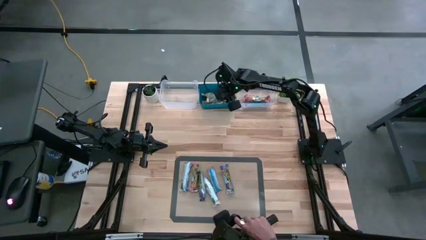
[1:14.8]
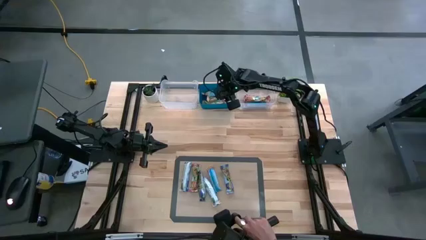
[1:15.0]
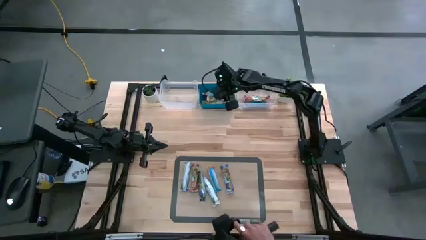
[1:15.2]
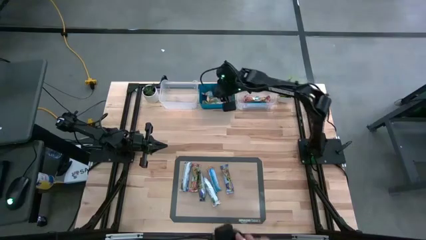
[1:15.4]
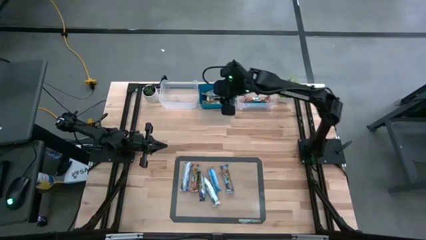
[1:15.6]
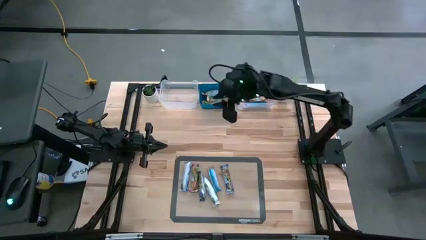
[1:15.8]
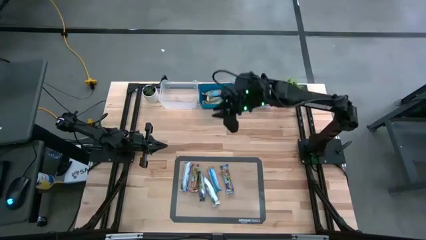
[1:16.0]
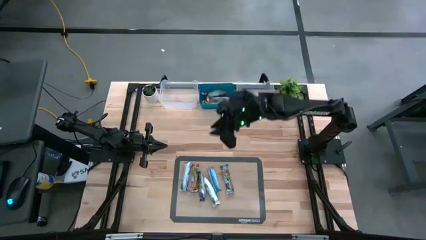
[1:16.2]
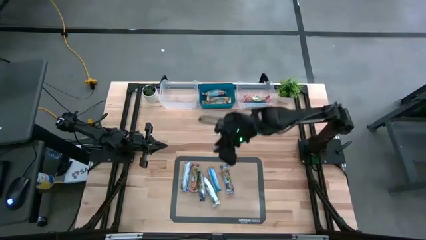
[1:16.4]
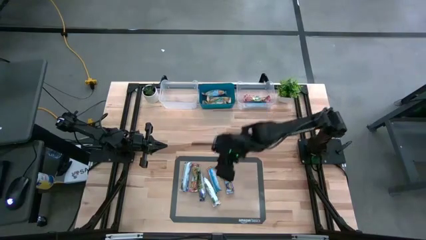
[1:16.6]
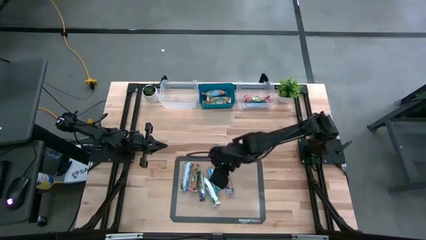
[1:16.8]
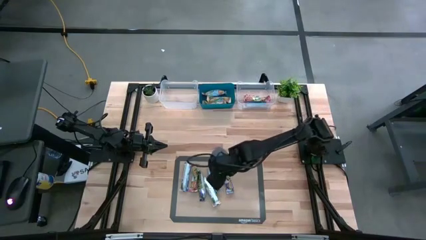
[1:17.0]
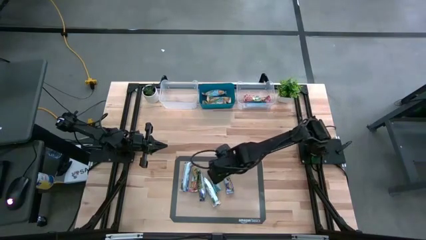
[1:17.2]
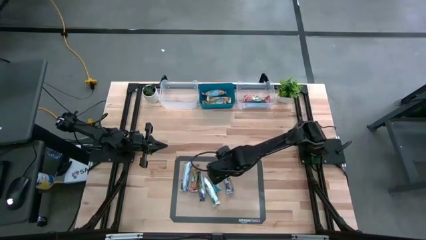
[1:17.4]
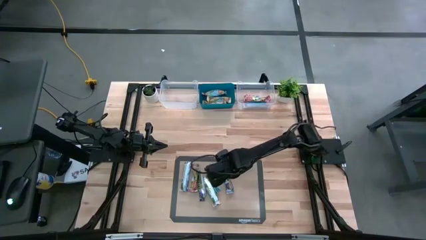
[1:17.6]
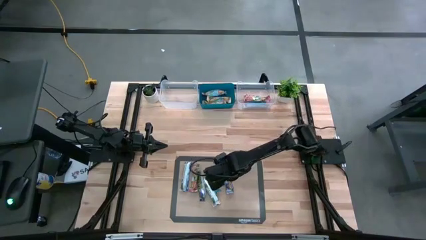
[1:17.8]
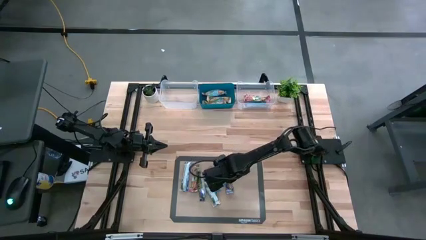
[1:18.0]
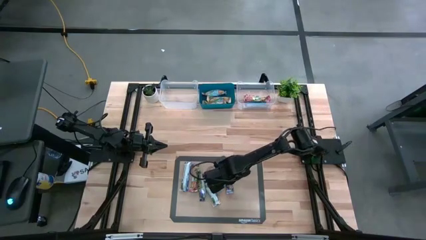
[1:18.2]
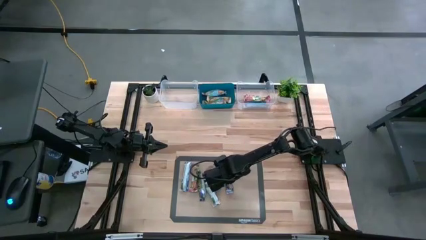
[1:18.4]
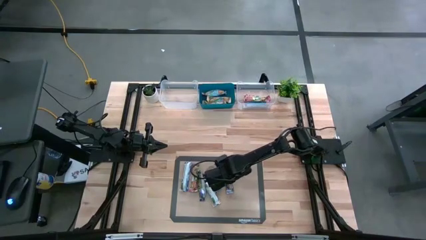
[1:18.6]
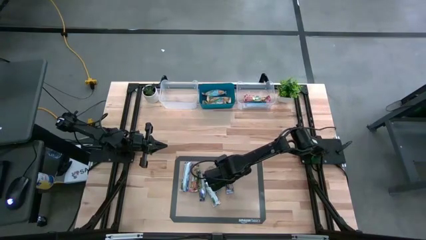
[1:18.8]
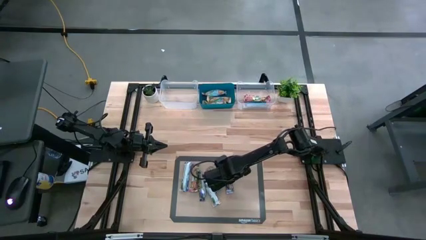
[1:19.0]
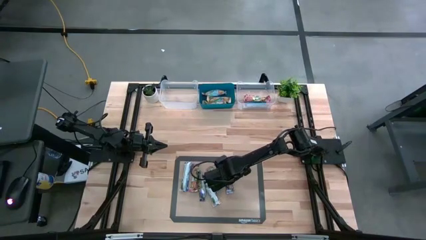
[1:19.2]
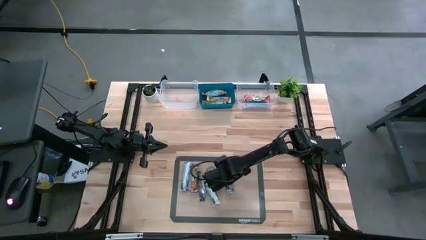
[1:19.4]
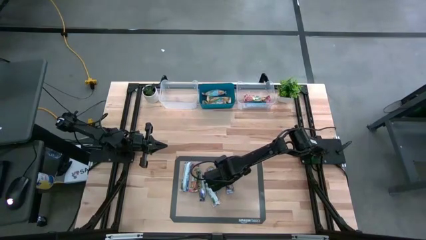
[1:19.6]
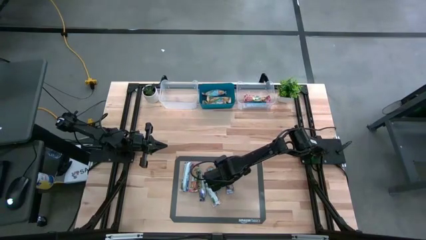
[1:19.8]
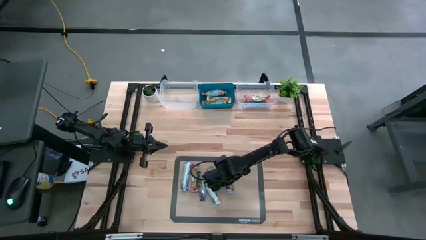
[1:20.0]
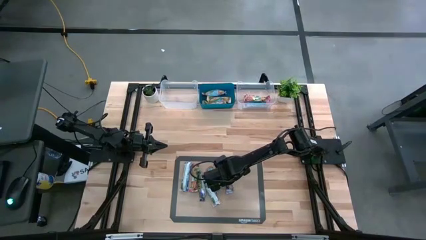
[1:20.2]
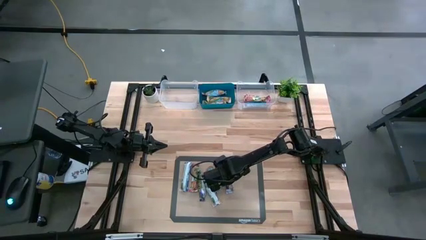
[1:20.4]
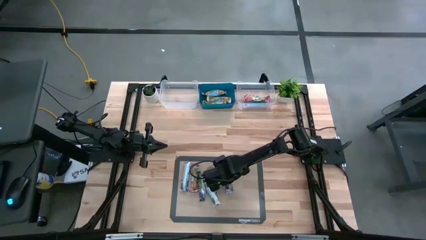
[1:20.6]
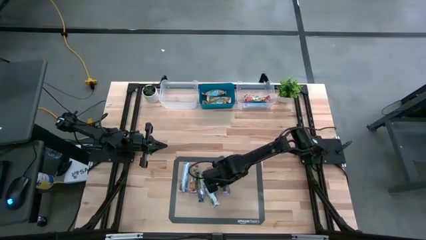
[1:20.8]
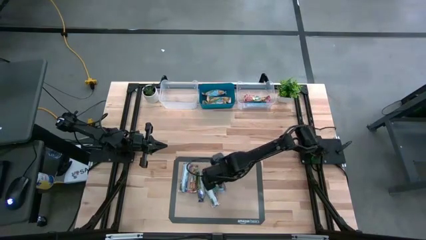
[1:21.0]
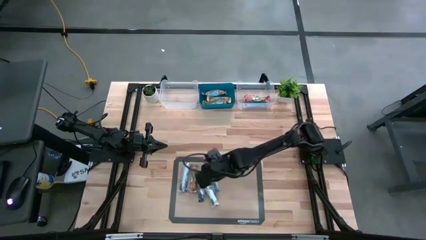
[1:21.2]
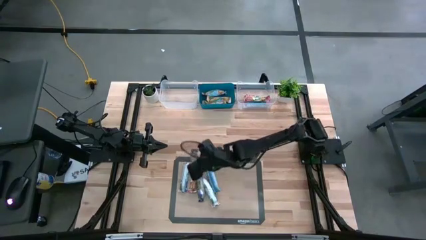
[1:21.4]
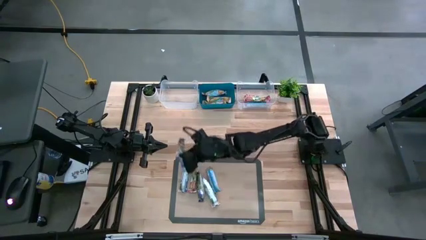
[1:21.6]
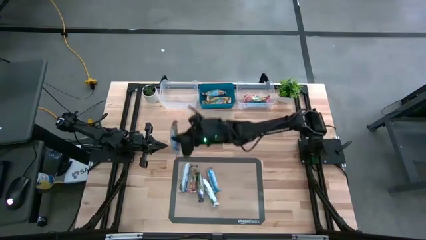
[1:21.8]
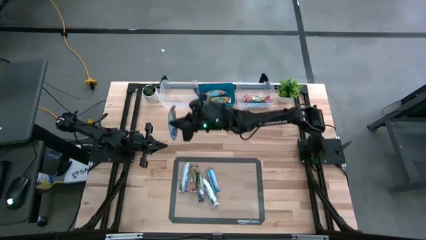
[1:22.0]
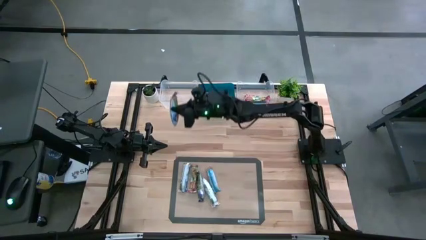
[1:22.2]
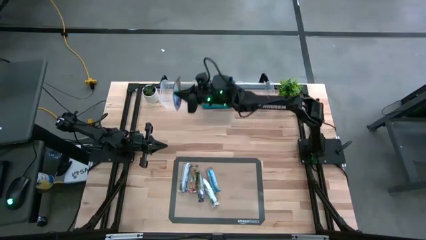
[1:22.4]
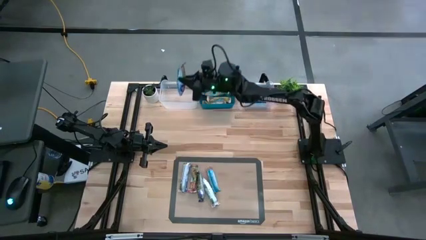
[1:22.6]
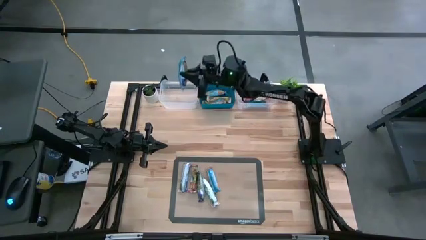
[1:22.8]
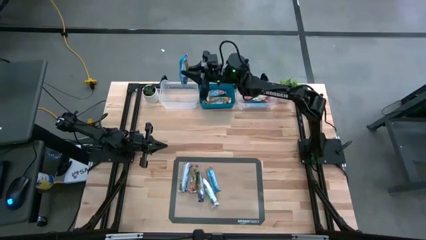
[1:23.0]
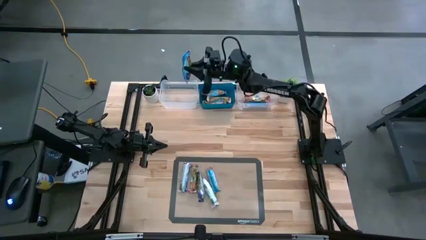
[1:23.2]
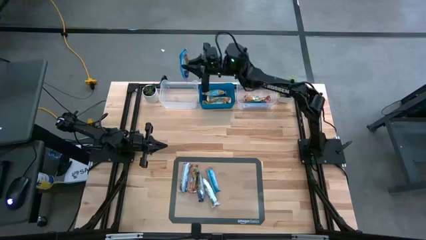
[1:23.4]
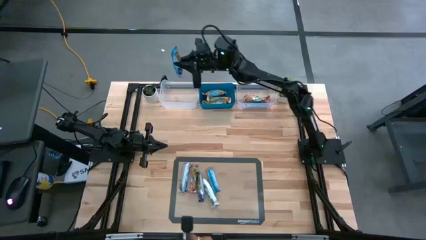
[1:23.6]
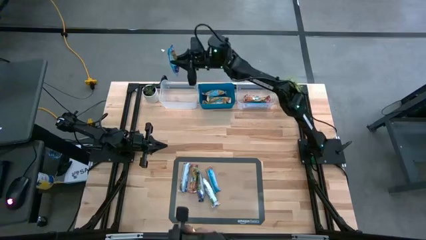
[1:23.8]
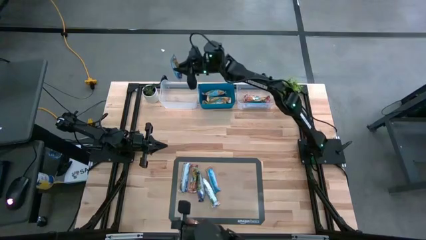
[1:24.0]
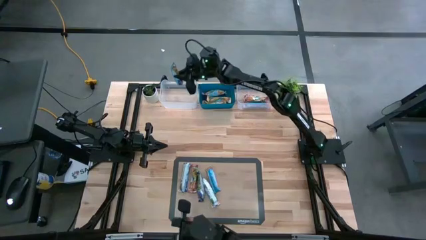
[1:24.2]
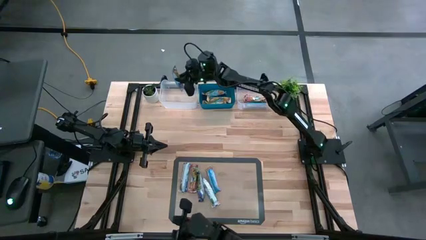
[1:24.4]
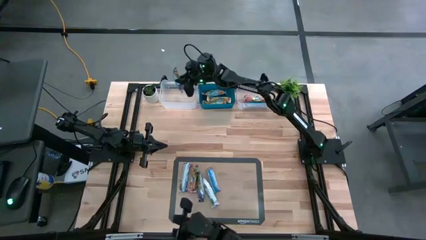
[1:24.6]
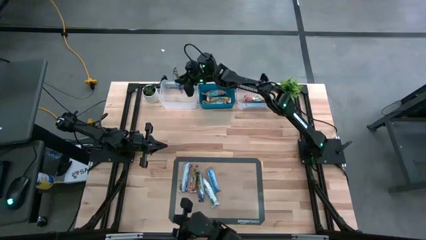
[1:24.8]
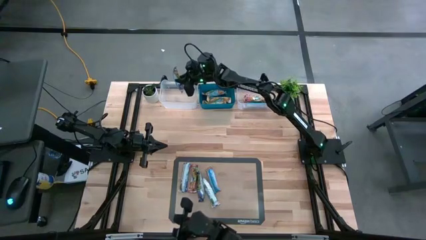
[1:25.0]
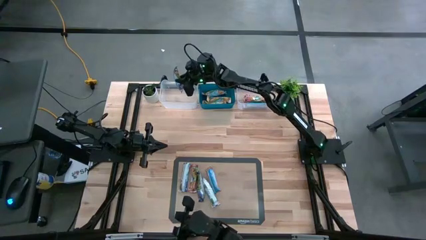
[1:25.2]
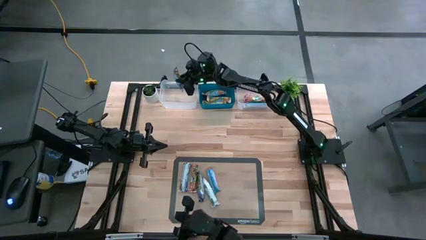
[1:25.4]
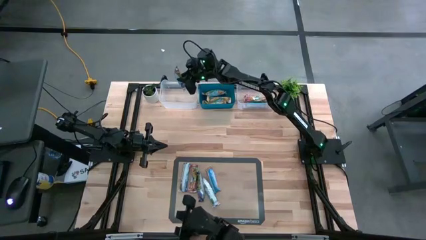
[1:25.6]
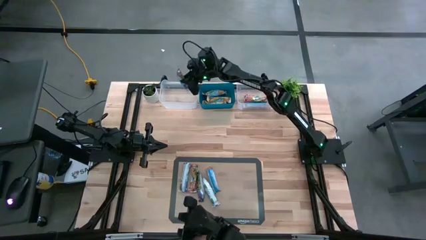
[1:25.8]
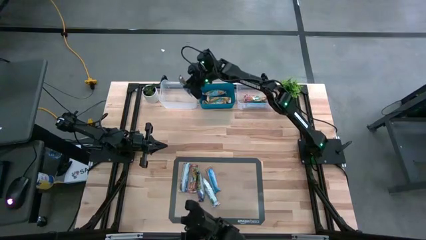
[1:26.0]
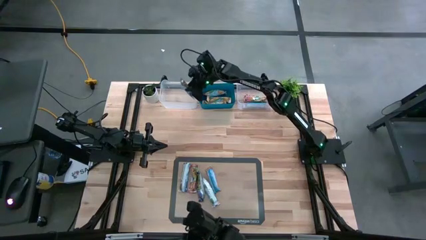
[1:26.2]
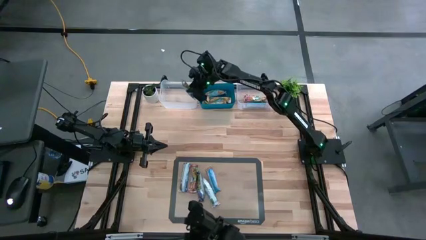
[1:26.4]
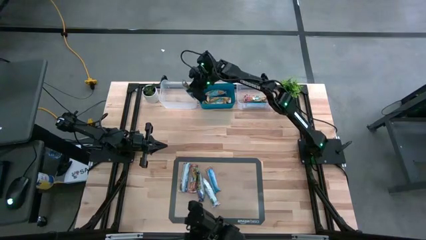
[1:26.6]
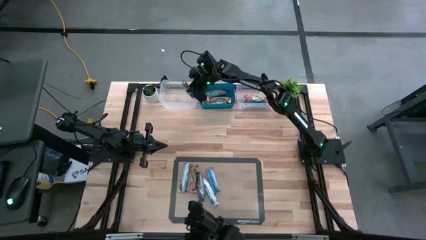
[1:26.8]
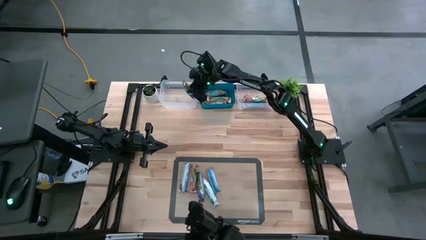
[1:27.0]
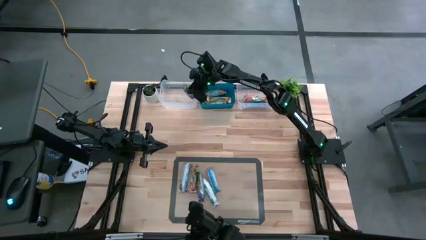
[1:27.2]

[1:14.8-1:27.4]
Task: Pick and place Granola Bars by type
Put the blue granola bar into the left transparent bin

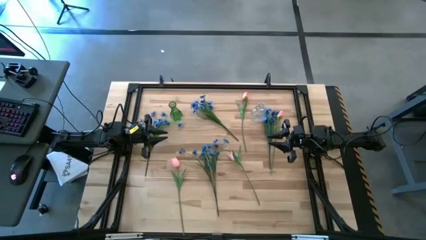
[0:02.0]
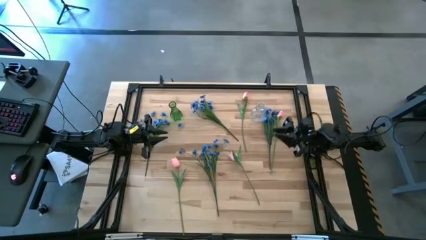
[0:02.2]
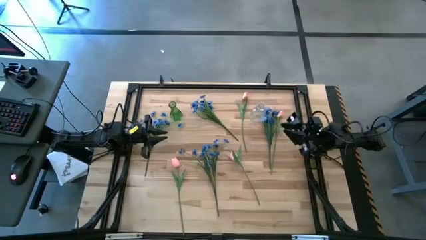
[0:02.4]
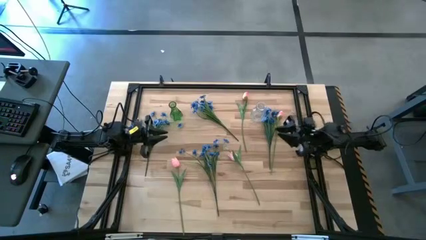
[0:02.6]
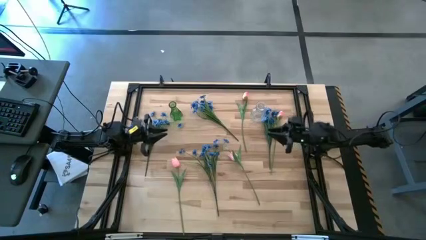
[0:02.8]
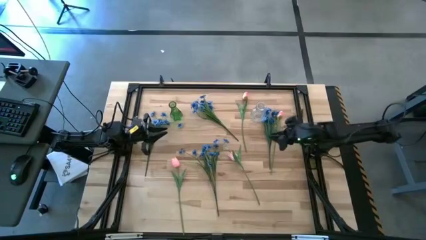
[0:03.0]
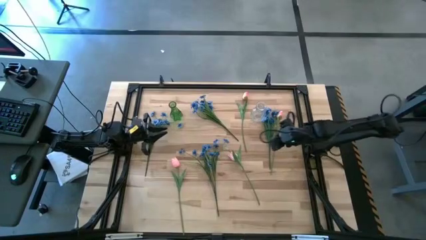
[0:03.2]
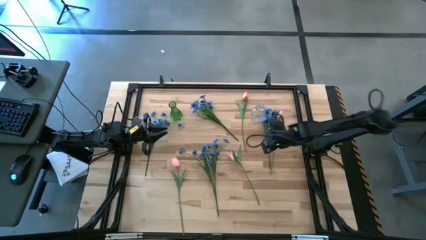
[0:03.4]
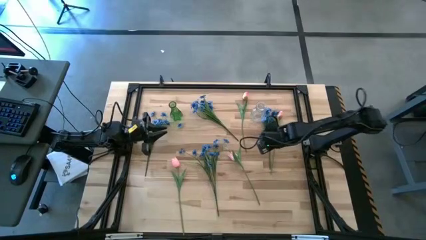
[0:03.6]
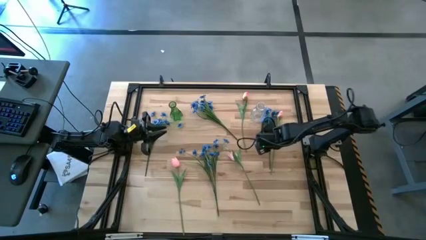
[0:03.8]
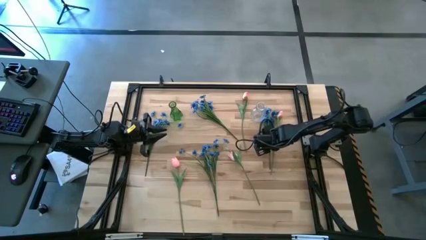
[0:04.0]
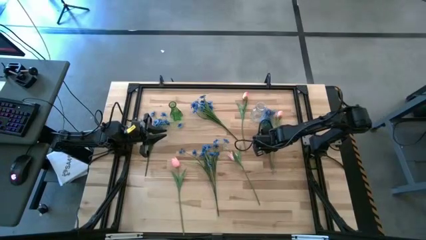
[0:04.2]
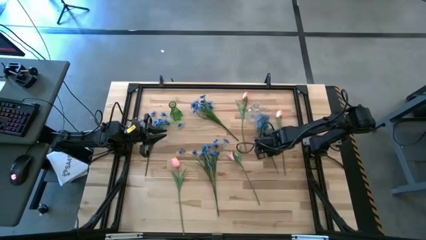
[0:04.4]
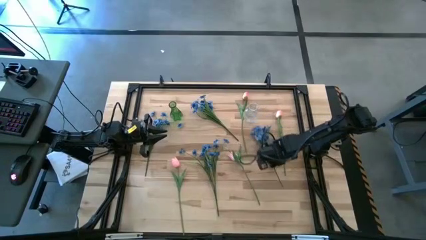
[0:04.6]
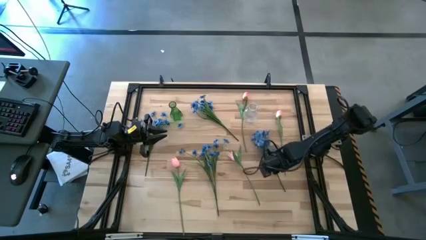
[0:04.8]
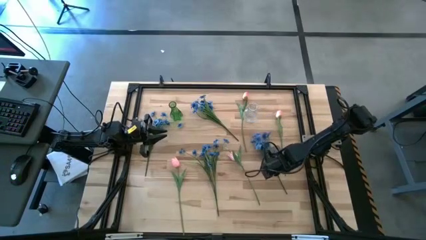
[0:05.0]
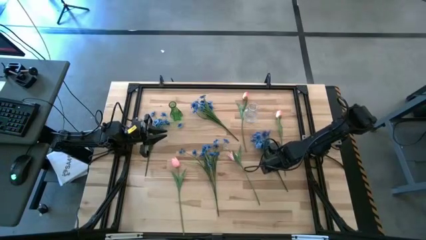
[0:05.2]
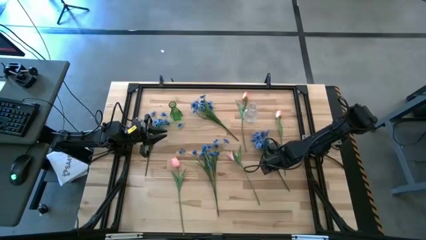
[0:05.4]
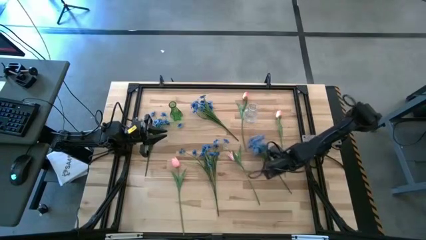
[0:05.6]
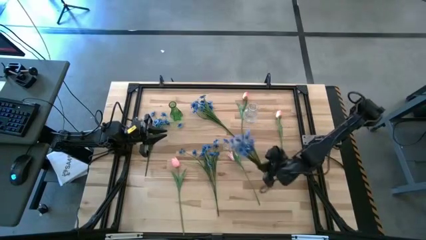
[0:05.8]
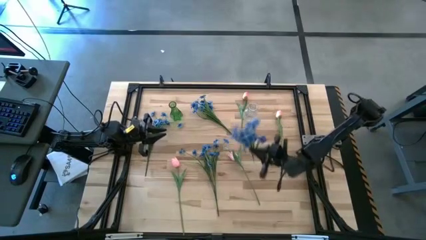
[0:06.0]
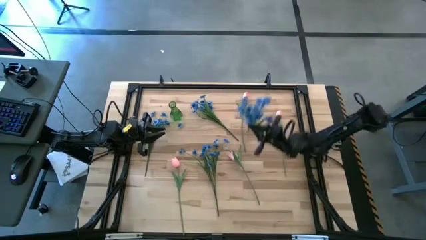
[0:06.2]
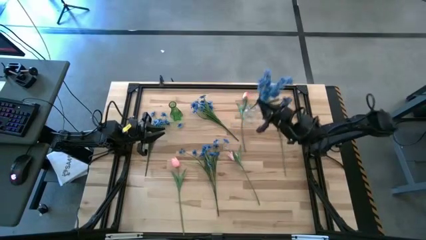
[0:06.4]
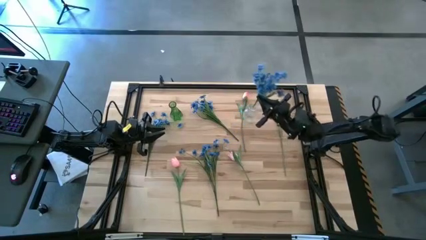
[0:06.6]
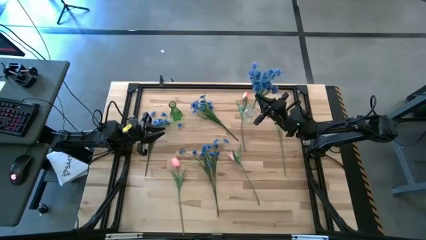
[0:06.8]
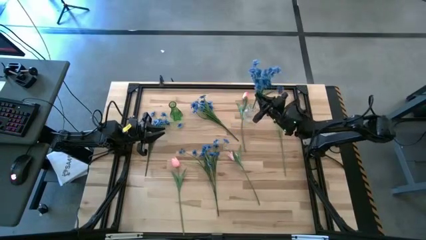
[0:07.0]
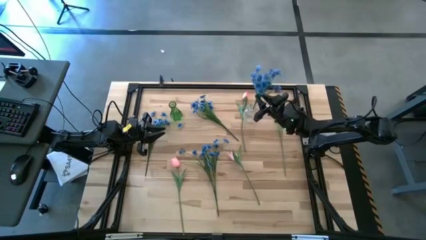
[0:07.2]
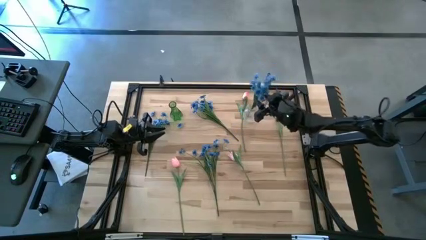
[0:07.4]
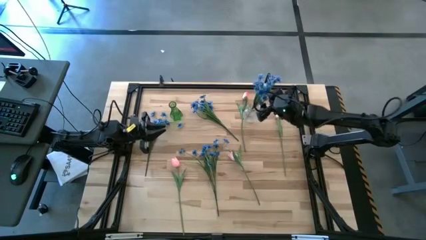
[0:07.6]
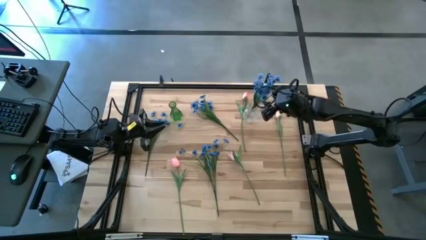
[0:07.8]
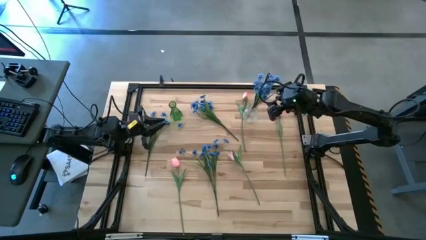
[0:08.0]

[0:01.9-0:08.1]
Task: Sort flowers into vase by color
Put the middle right blue flowers into the transparent vase
